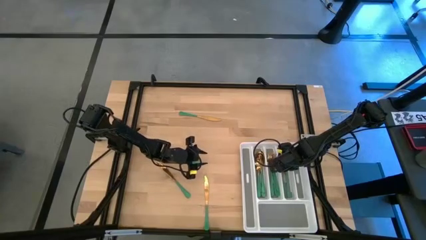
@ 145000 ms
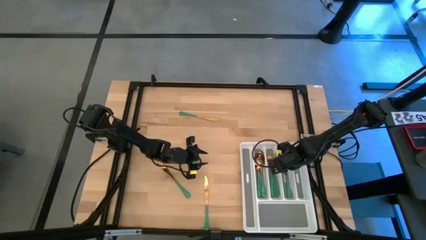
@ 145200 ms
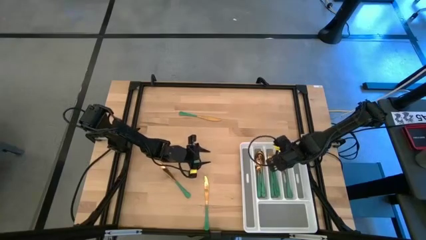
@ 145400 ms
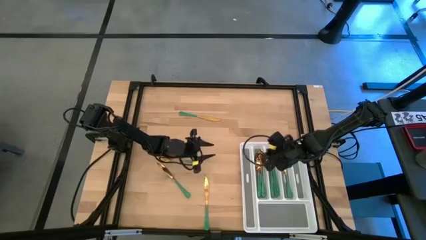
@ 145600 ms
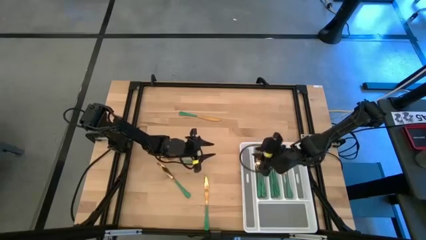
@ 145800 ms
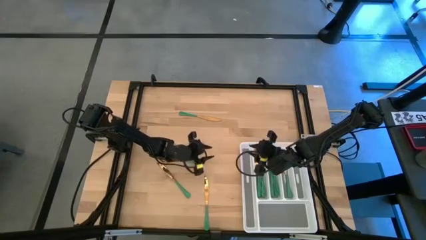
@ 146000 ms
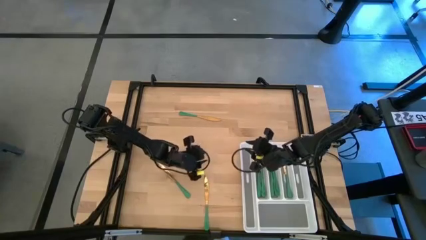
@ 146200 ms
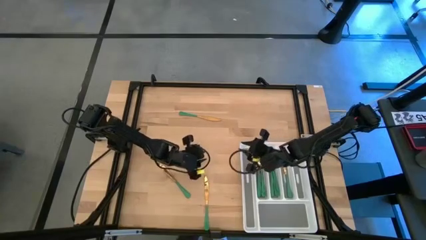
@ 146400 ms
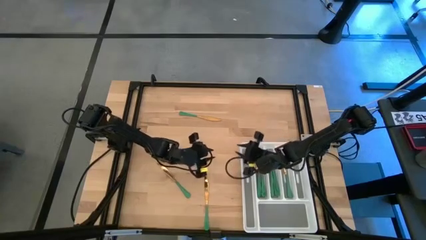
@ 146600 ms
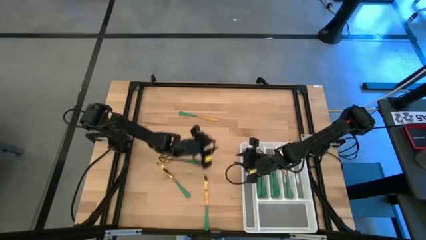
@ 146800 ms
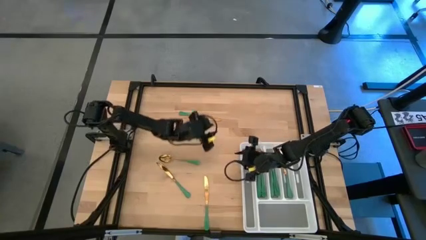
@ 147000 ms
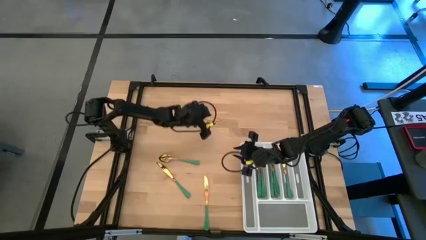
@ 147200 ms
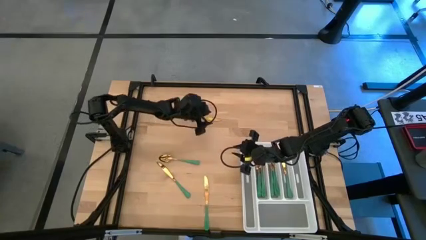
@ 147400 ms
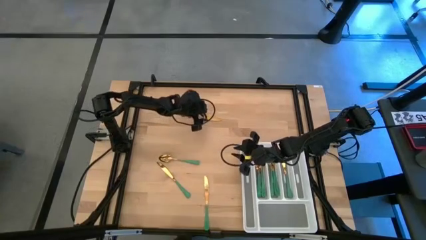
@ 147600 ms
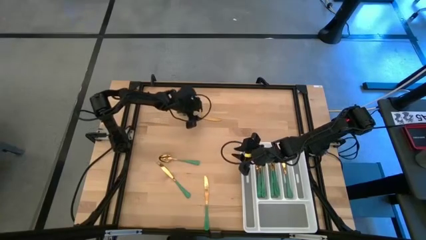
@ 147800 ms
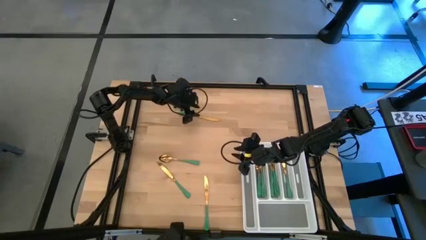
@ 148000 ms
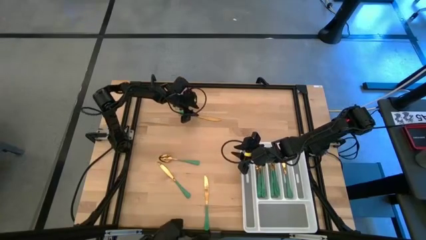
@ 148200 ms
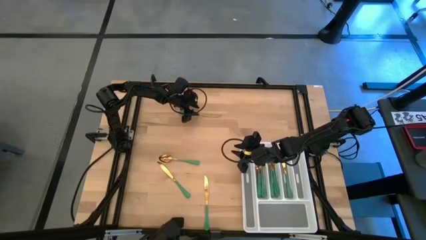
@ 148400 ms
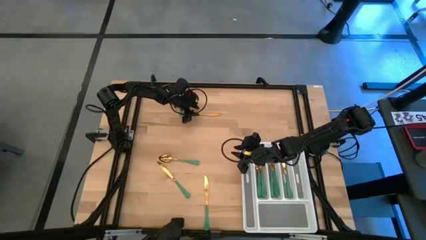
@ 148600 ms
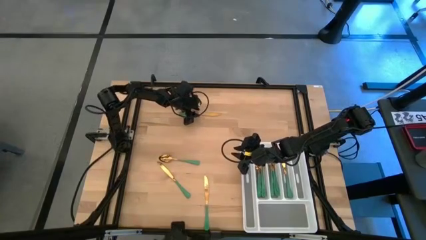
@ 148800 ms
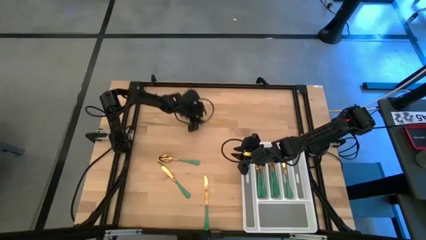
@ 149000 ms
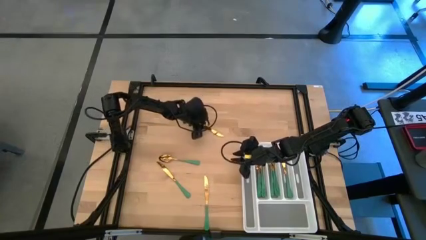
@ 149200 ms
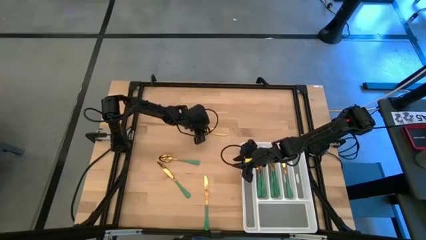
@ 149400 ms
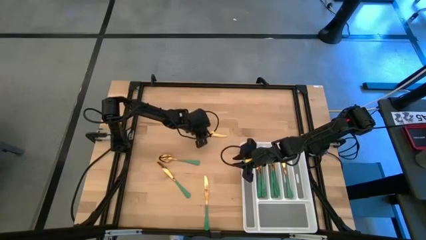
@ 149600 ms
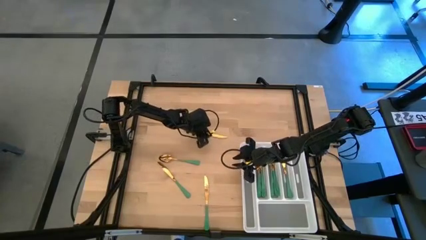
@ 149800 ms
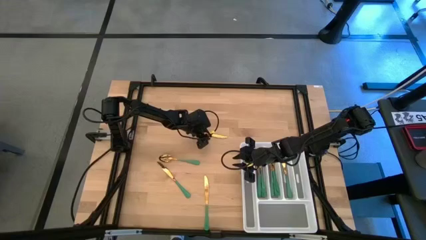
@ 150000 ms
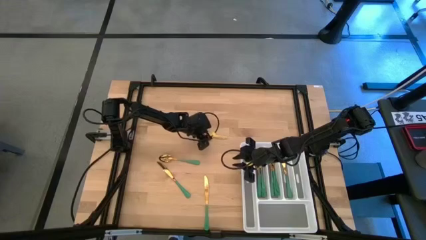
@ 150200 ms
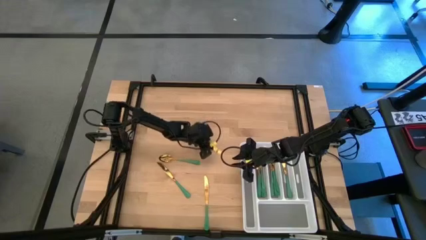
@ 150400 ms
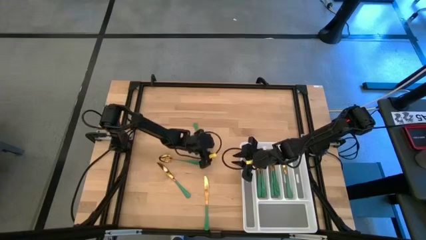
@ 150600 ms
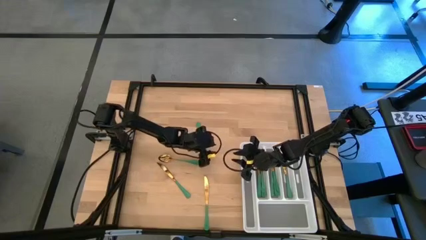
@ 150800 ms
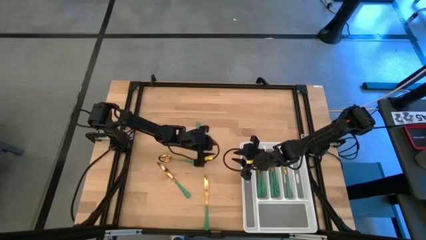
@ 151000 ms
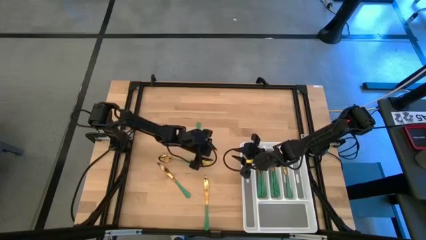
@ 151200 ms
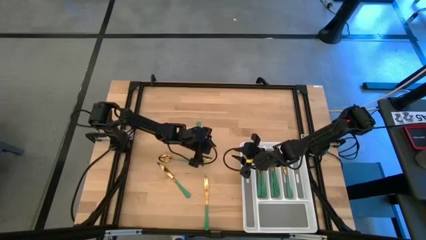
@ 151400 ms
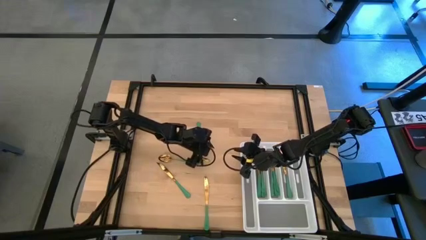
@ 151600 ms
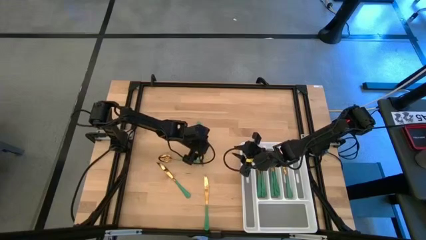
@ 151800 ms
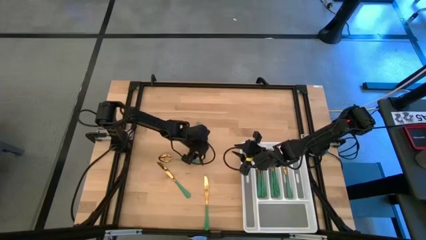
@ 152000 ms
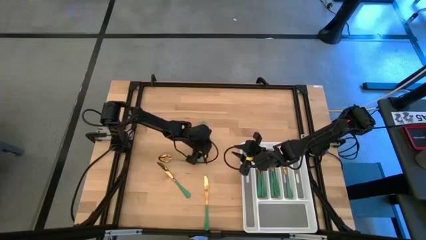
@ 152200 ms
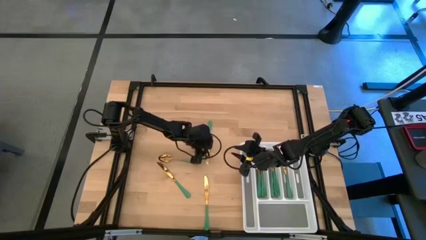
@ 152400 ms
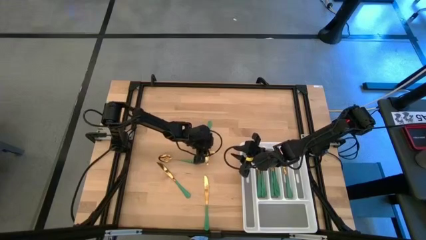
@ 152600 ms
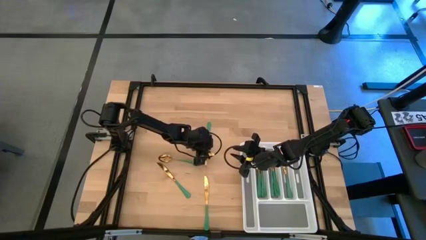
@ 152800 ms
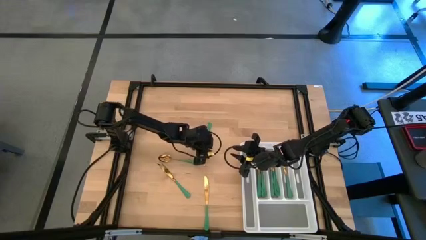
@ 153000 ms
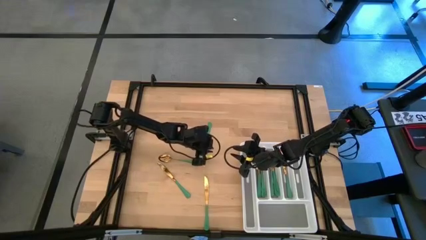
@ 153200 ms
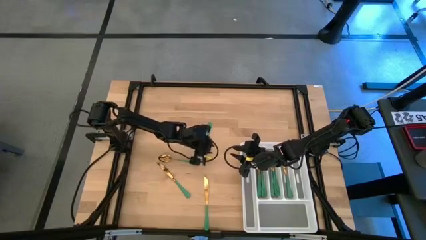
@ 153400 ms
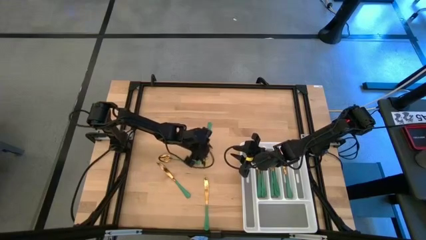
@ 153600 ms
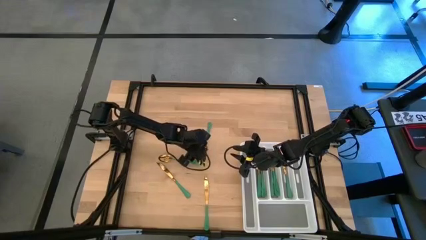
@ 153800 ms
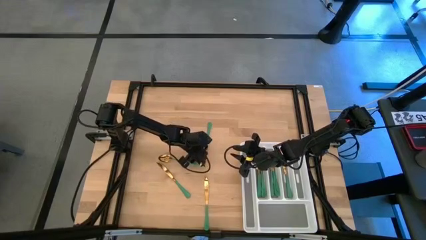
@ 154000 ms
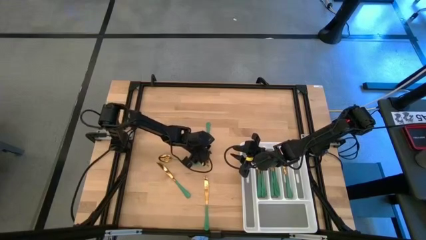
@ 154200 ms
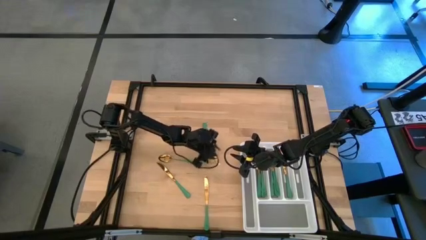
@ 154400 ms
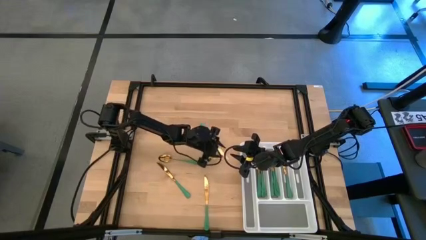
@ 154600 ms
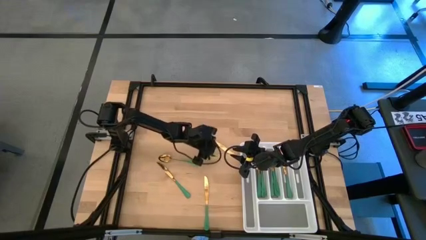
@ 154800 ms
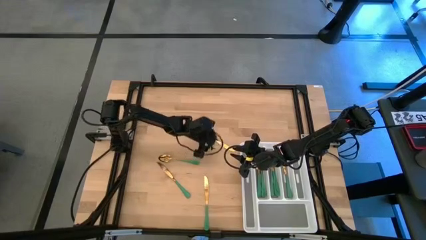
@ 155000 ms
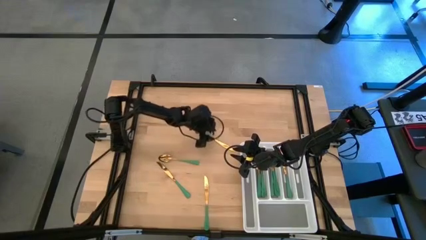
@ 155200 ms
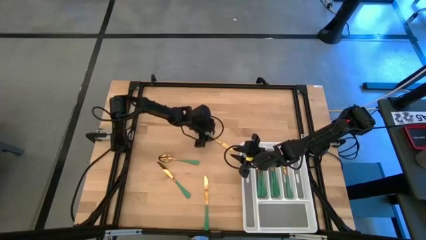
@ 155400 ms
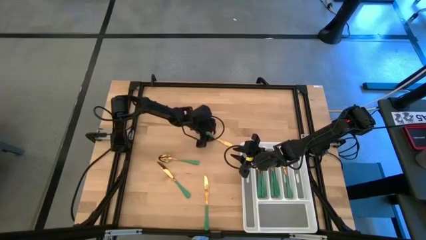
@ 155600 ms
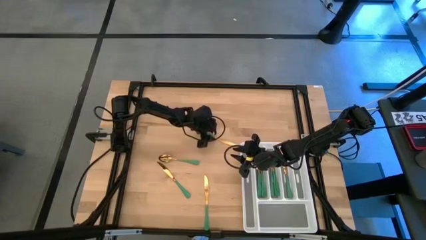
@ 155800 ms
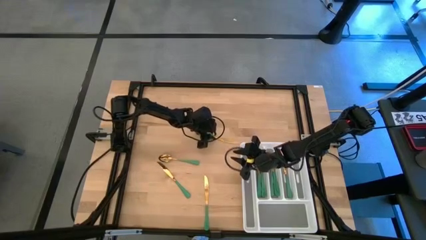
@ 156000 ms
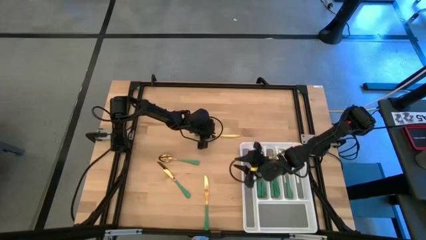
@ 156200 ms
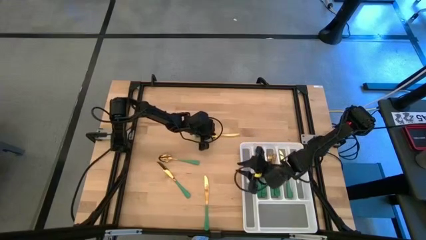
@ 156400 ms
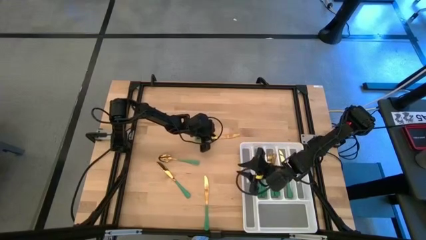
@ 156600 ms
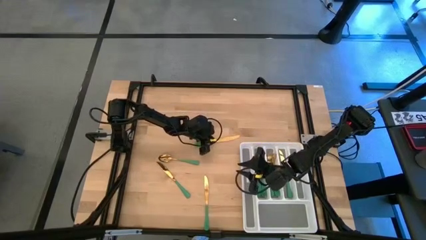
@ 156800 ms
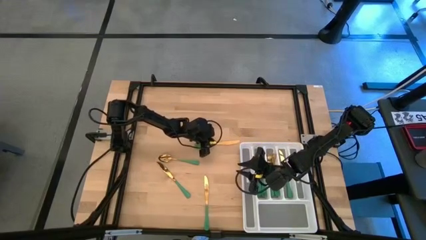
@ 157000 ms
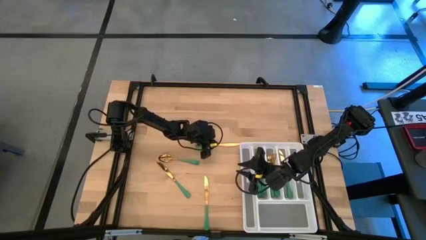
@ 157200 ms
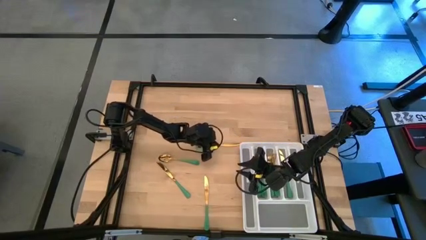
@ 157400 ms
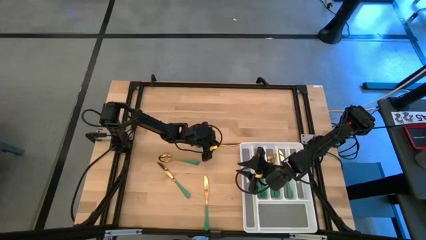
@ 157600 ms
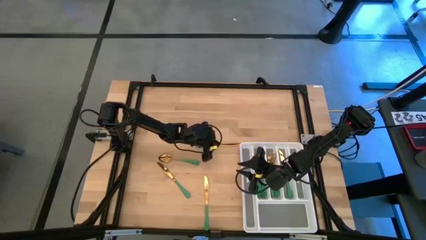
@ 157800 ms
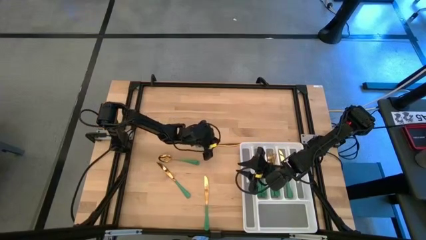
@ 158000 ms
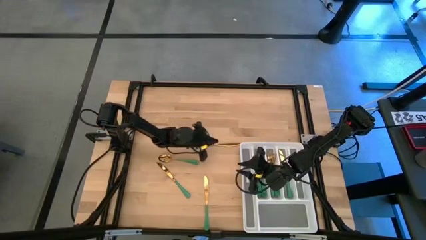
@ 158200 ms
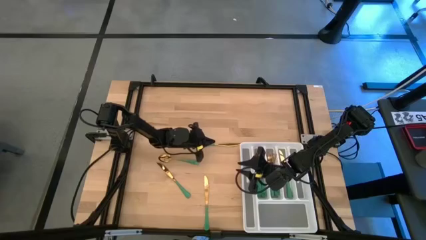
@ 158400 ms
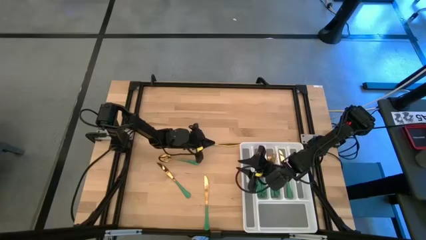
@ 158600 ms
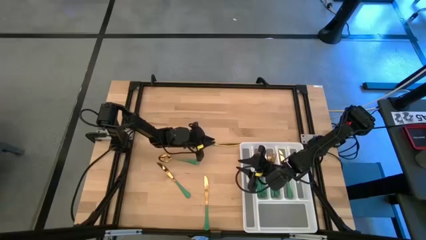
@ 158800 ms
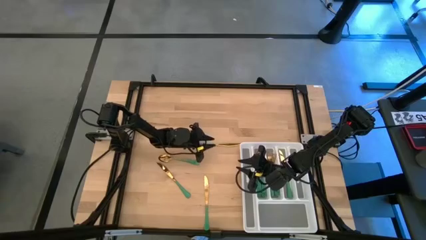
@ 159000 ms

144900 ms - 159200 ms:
Task: Sort silverware
Put the top center green knife into the silverware rack
